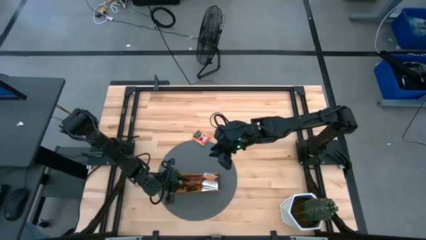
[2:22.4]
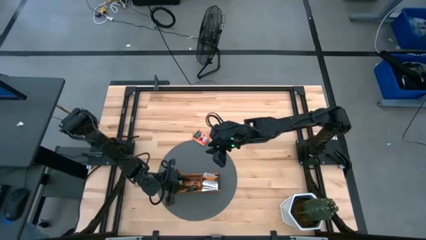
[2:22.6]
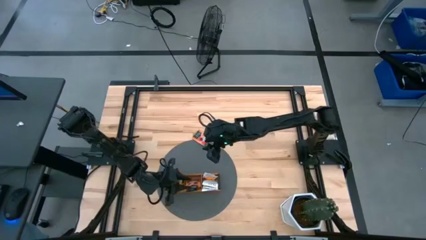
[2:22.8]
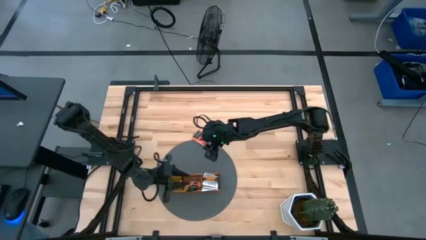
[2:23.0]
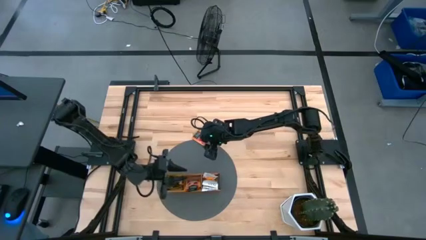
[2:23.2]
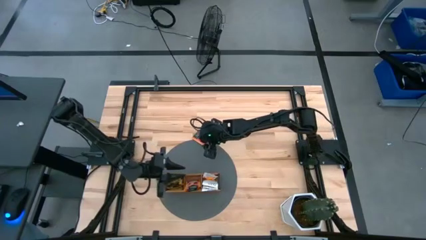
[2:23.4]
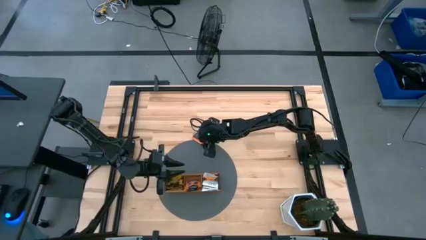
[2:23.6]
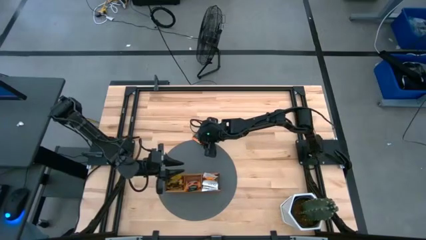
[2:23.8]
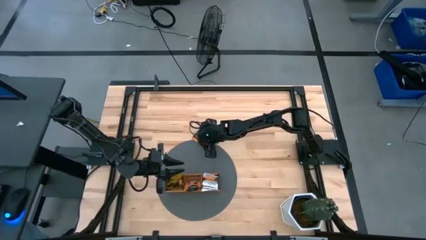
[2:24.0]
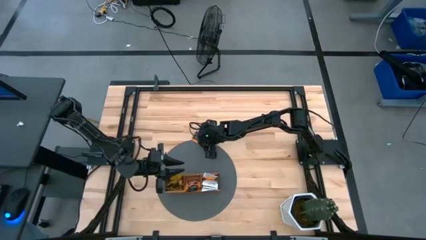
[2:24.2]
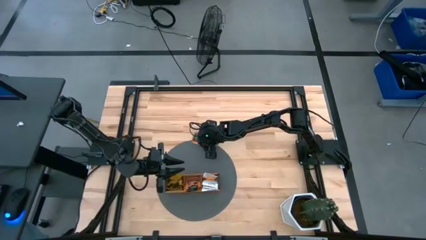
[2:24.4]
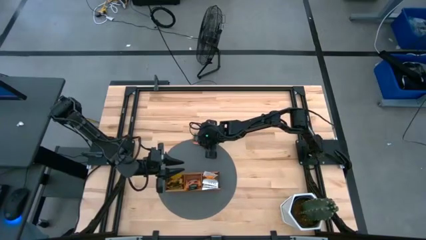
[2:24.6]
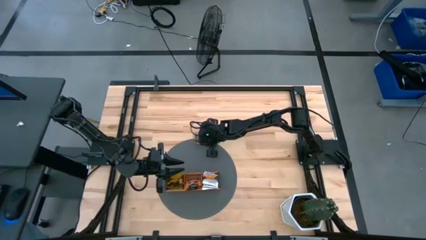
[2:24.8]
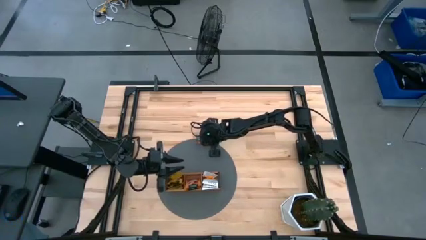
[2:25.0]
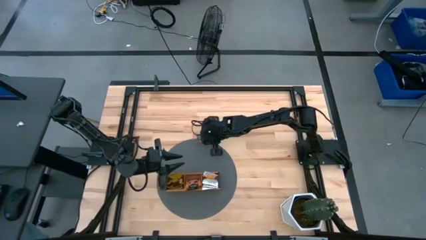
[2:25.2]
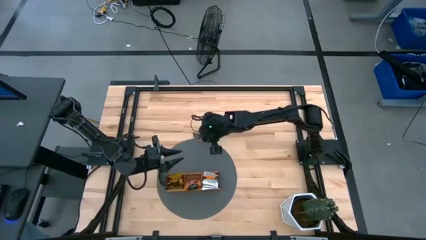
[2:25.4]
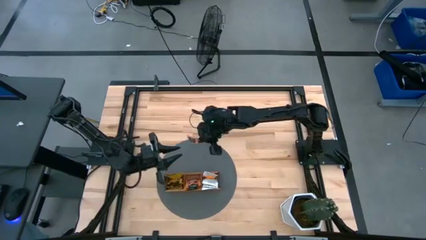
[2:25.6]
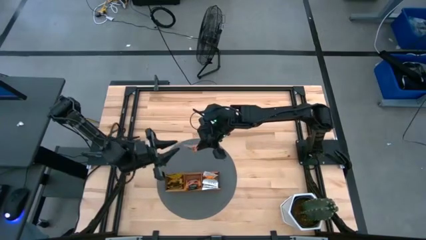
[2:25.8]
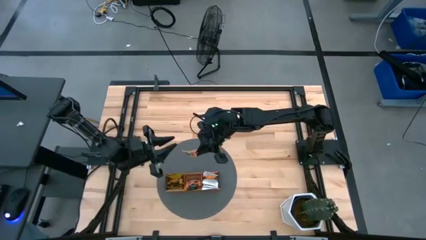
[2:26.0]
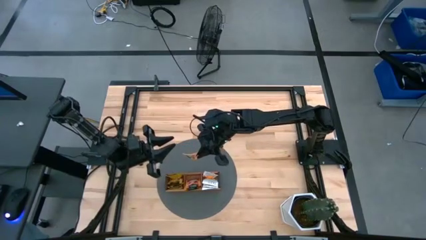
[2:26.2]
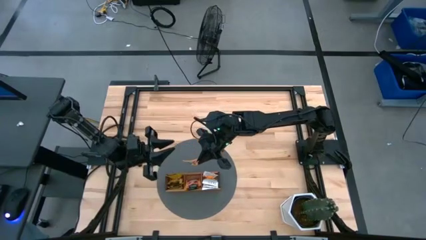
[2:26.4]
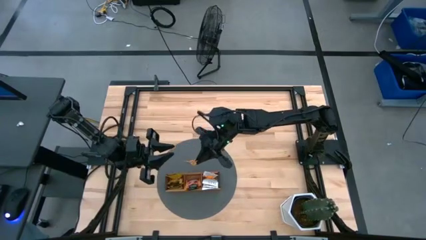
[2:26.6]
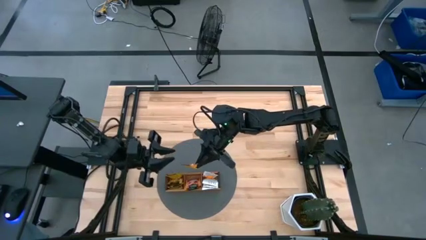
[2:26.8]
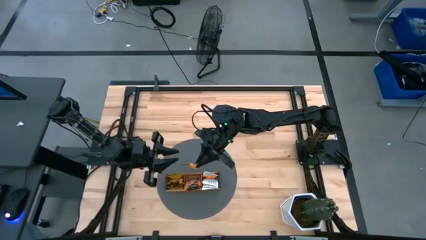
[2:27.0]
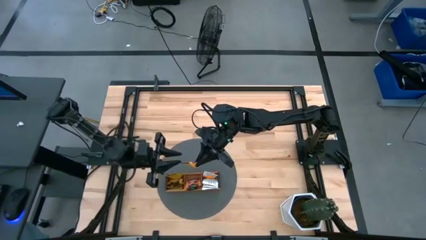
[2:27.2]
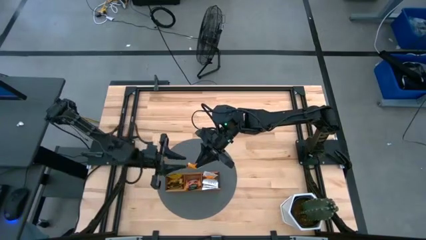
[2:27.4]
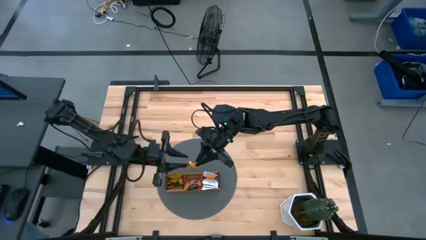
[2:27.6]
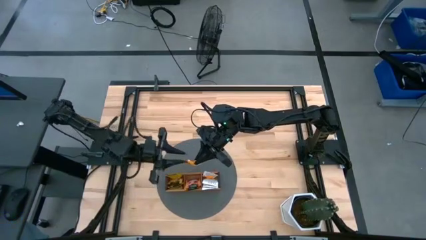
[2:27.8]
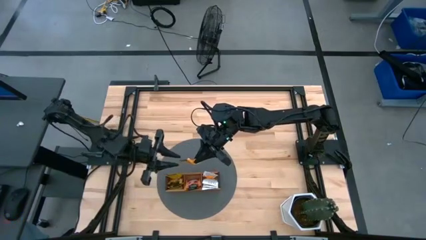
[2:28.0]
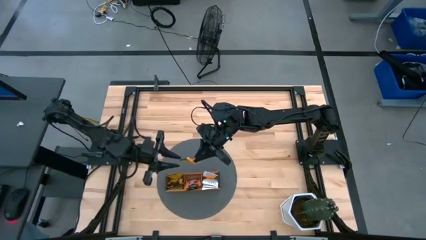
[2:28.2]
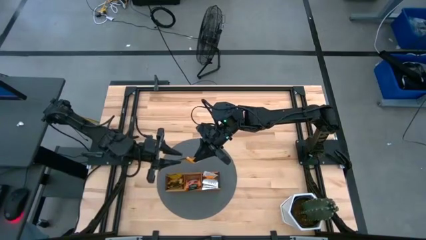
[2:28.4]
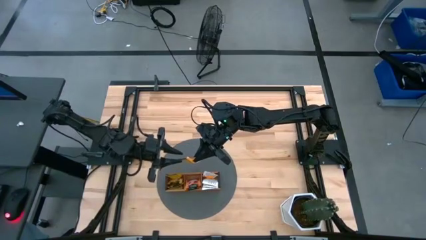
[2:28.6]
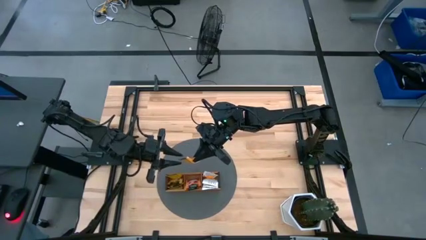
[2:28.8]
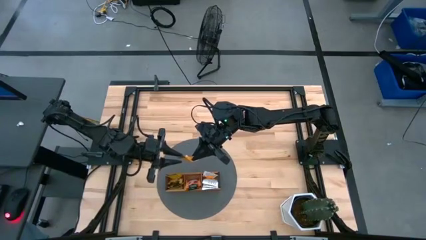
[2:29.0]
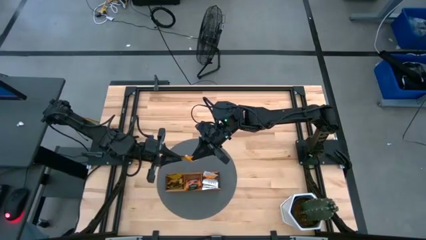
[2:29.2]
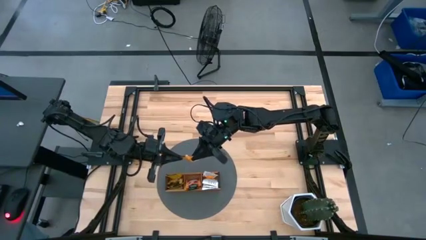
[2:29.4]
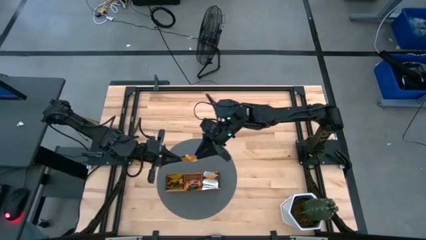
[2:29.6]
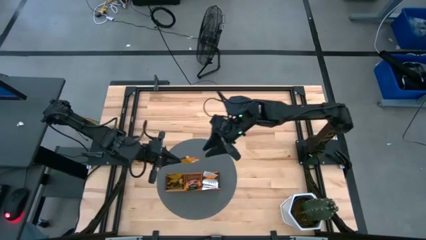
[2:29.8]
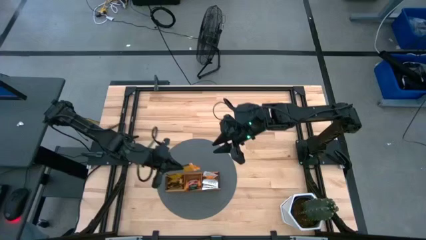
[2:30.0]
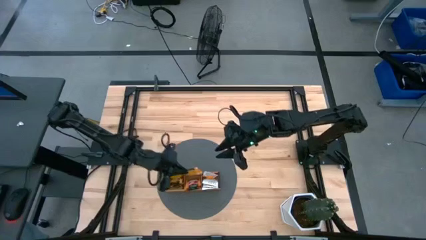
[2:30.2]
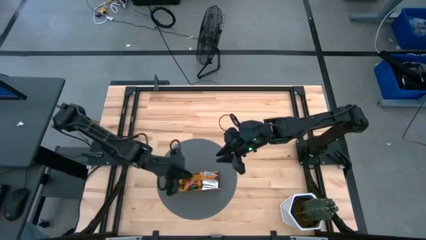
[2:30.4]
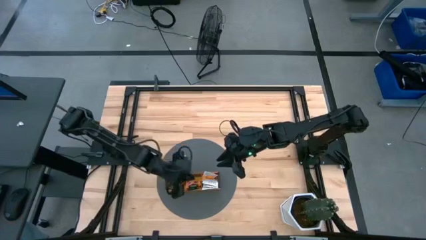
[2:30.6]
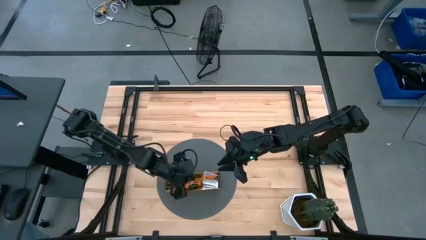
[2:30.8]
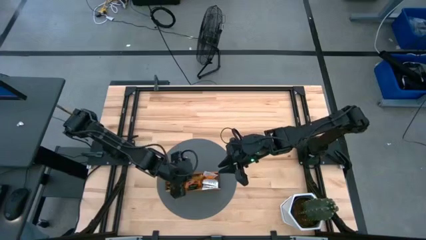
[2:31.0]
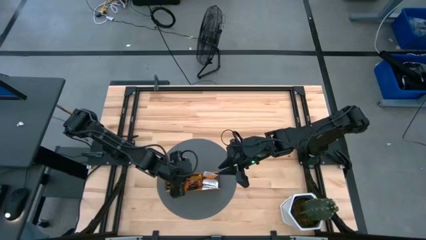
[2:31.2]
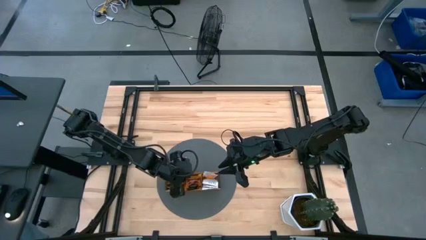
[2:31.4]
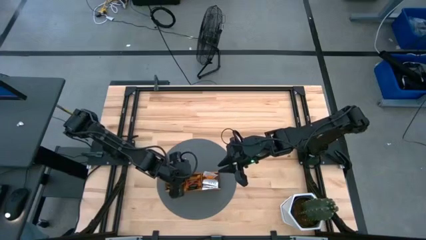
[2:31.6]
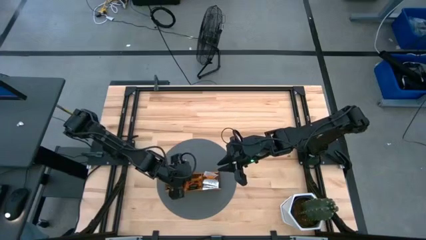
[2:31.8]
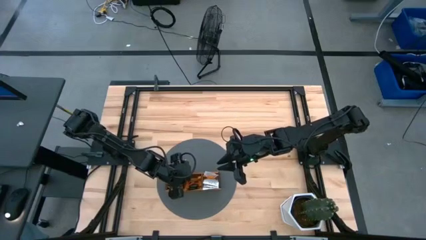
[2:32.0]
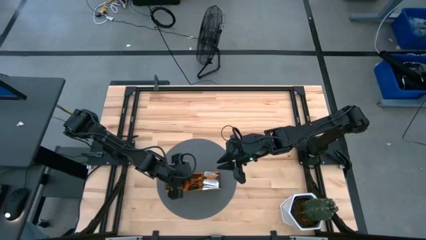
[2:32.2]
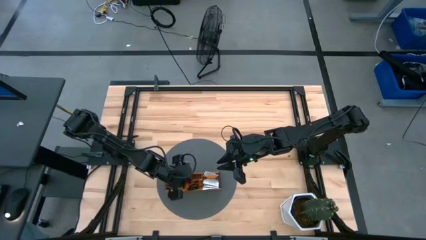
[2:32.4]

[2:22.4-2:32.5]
Task: Pick & Place Tea
Put the orange tea bag into the middle section of the wooden organizer

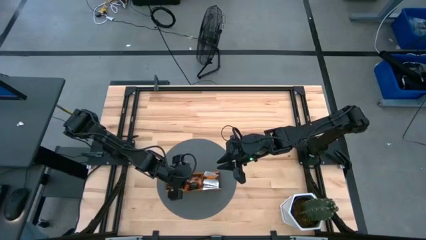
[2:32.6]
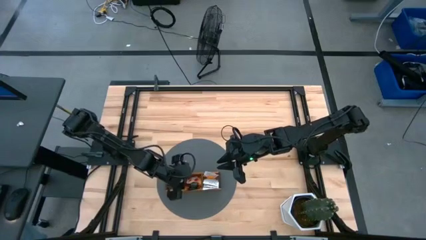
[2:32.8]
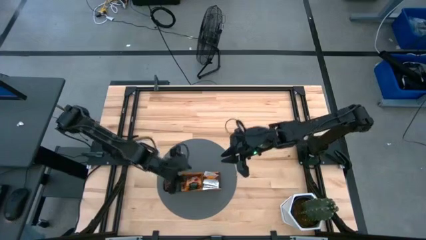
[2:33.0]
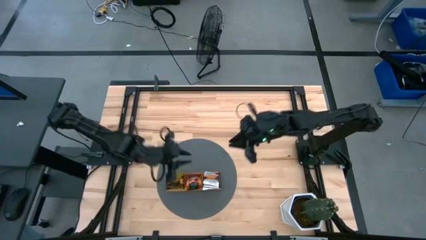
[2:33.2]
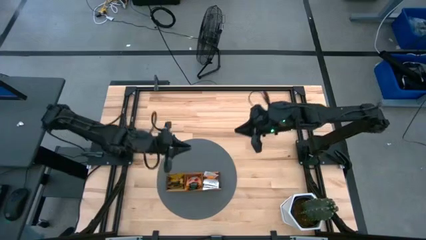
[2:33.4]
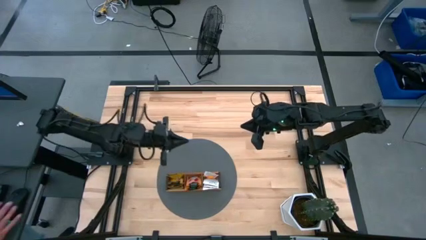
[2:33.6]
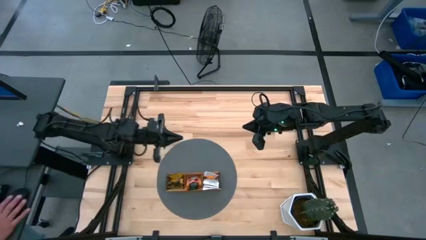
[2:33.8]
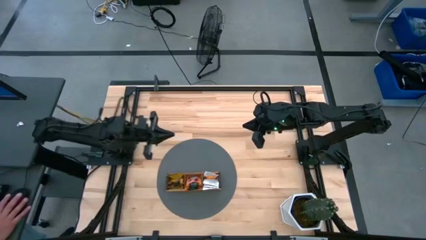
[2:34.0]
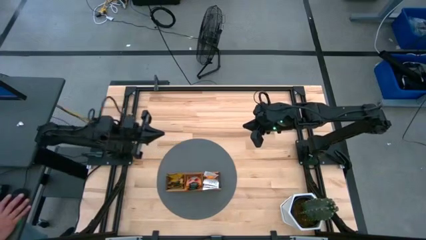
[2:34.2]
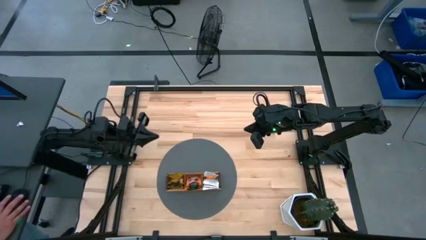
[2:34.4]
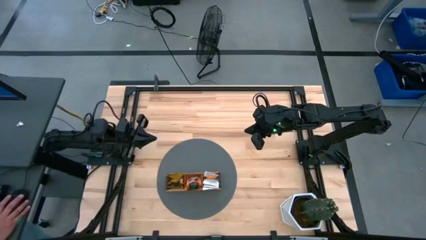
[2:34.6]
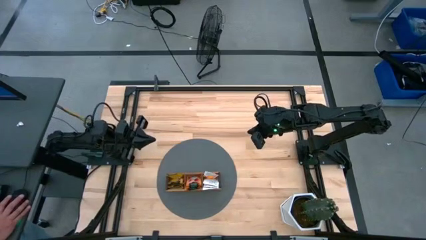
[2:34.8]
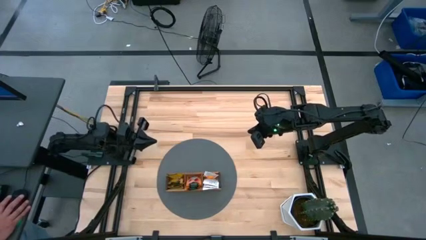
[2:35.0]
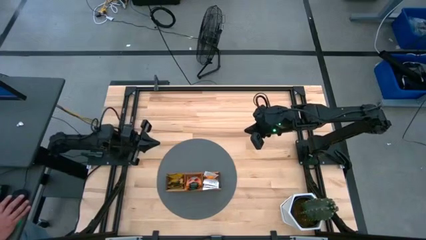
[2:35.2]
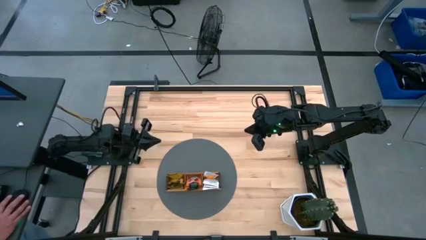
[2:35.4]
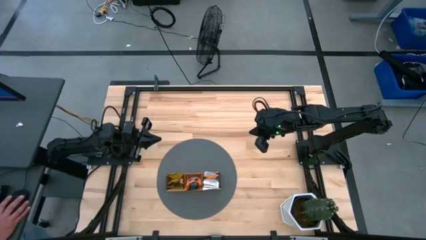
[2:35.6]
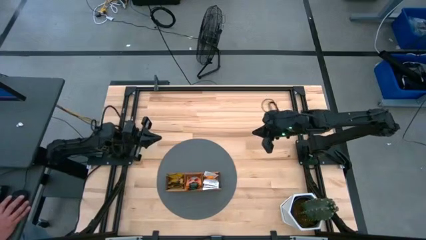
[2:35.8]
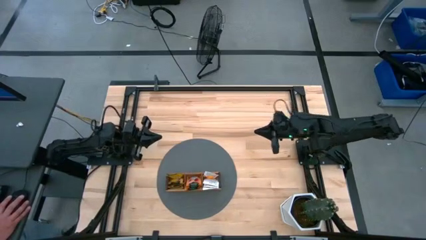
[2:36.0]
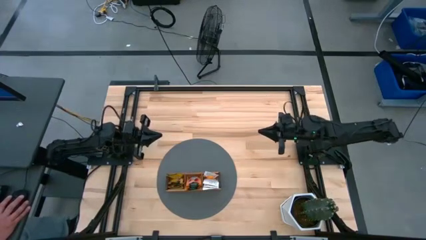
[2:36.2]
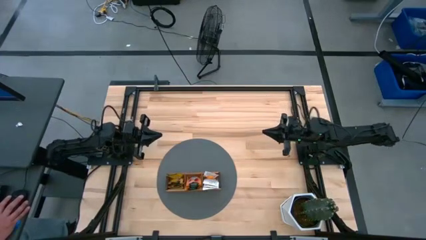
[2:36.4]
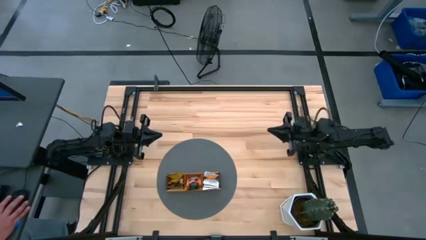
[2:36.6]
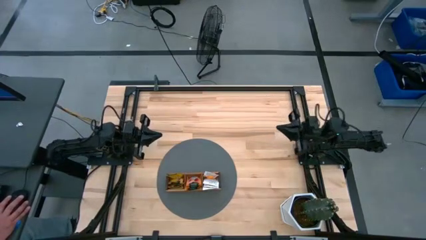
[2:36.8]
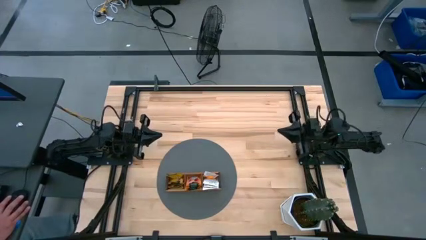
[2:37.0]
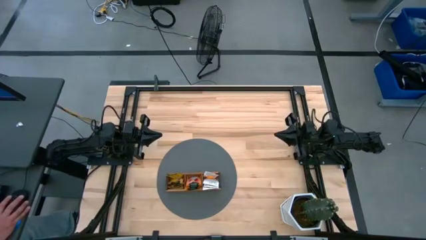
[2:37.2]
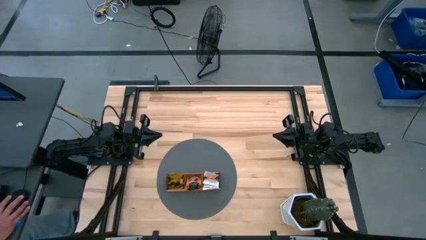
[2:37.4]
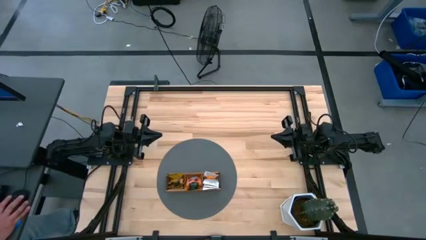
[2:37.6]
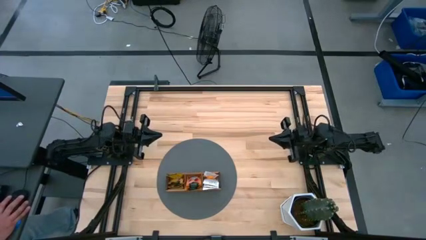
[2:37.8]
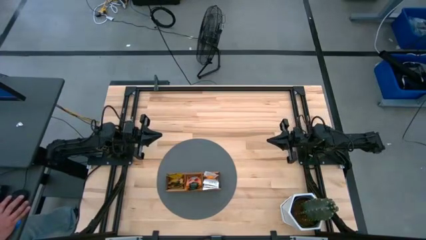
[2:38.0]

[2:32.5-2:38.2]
Return to Home Position
